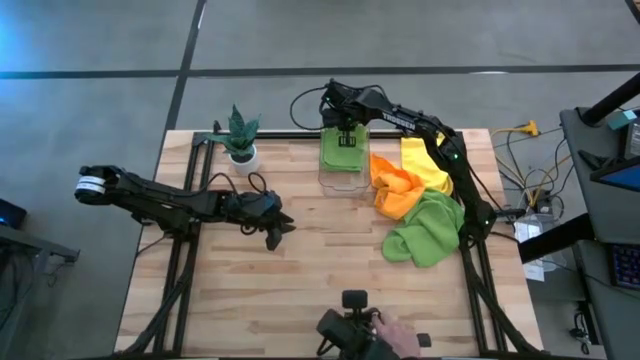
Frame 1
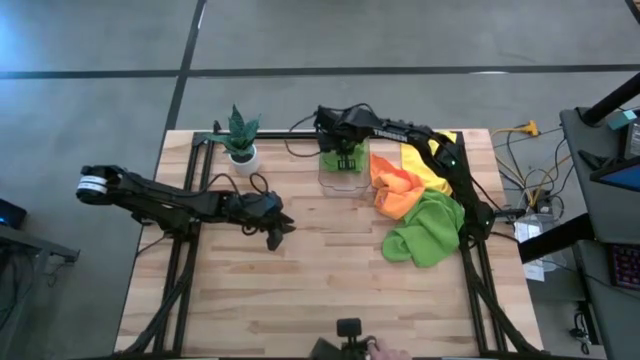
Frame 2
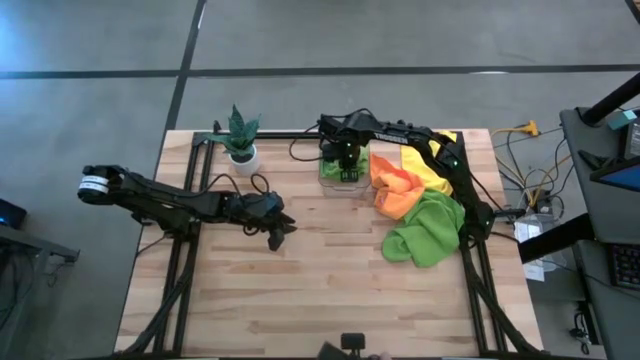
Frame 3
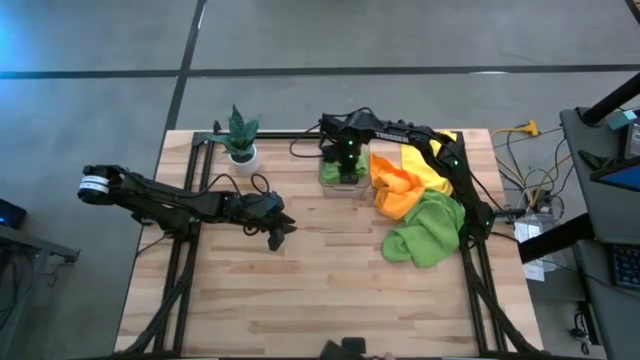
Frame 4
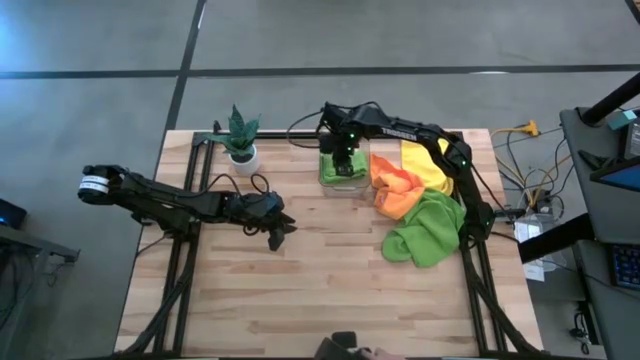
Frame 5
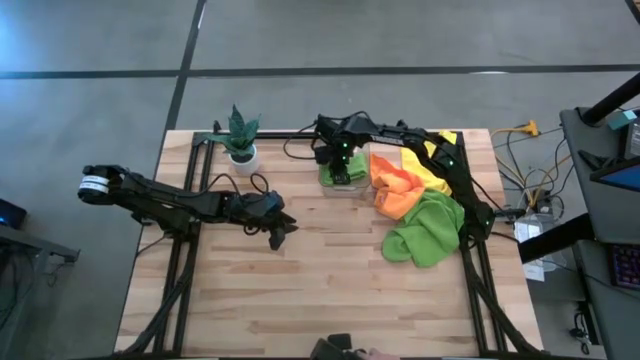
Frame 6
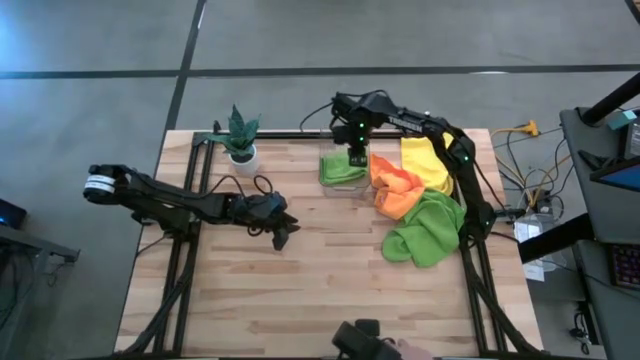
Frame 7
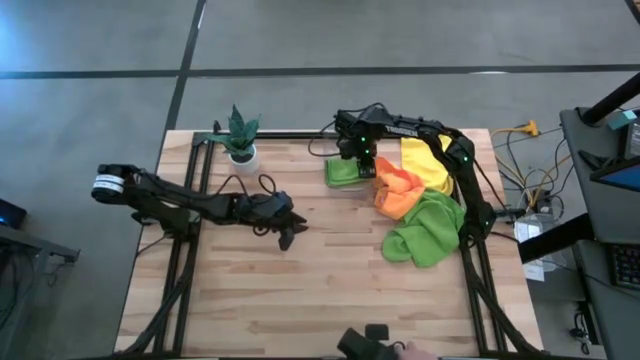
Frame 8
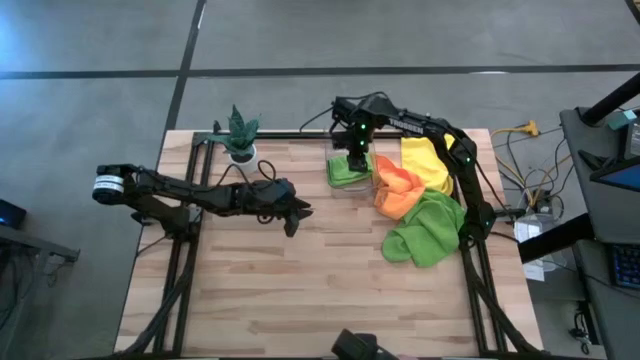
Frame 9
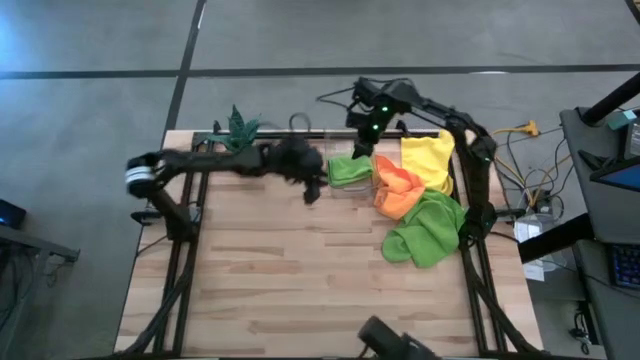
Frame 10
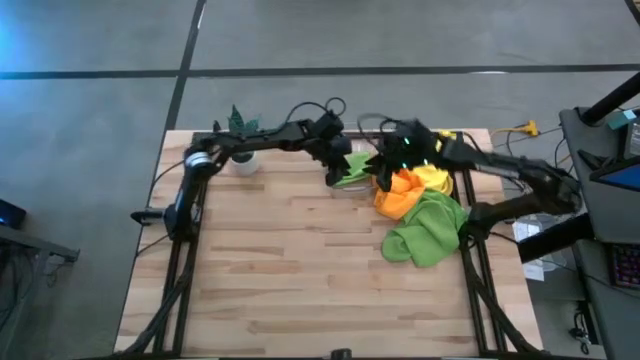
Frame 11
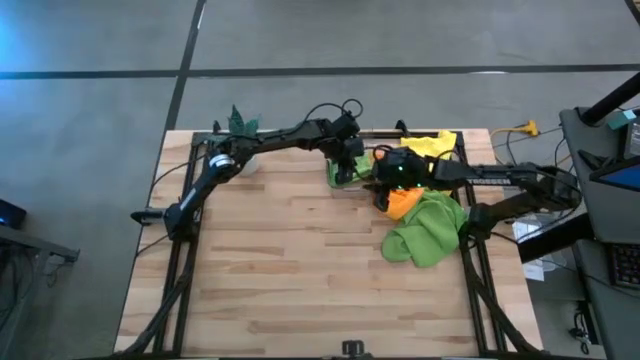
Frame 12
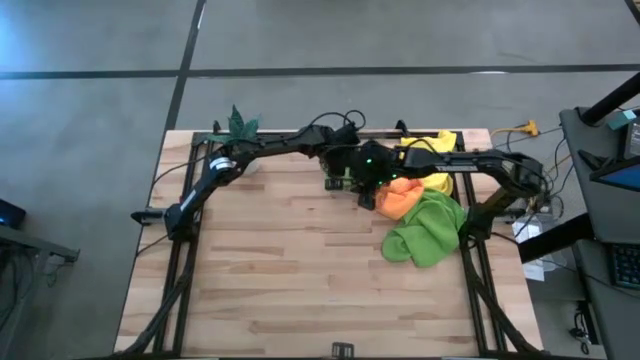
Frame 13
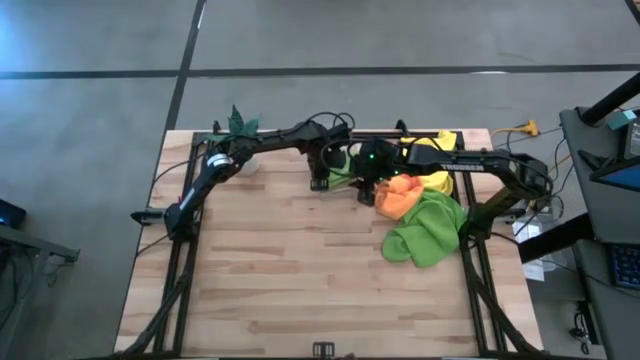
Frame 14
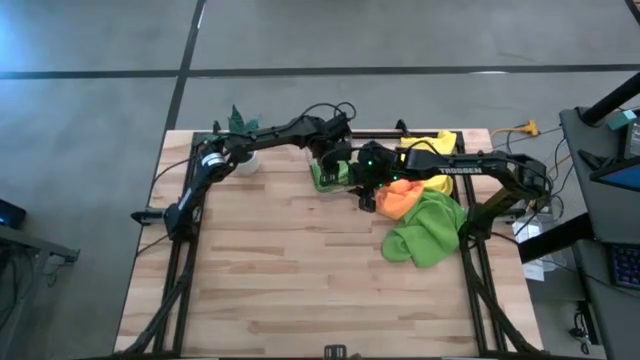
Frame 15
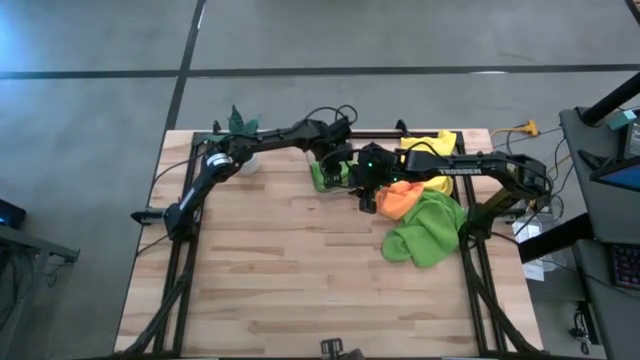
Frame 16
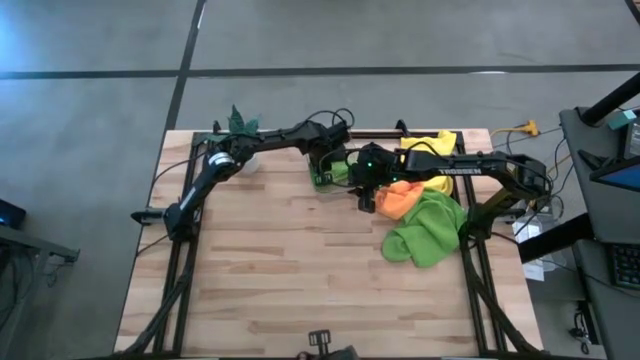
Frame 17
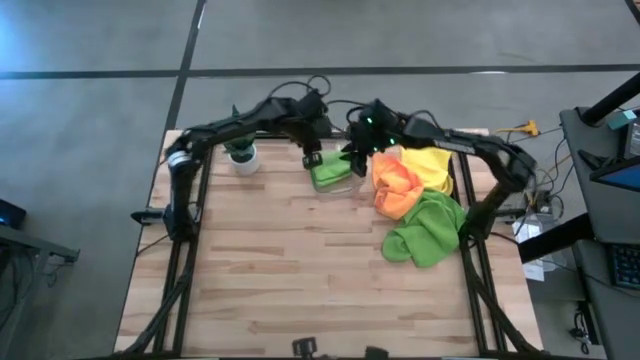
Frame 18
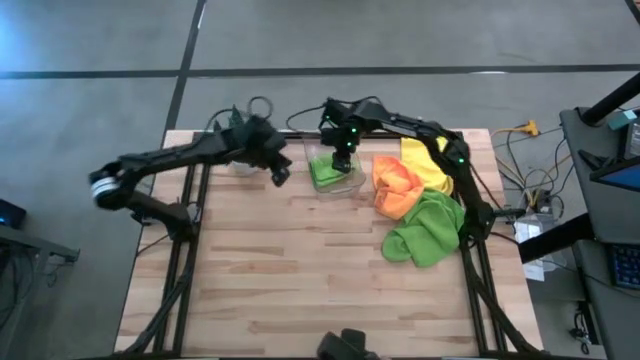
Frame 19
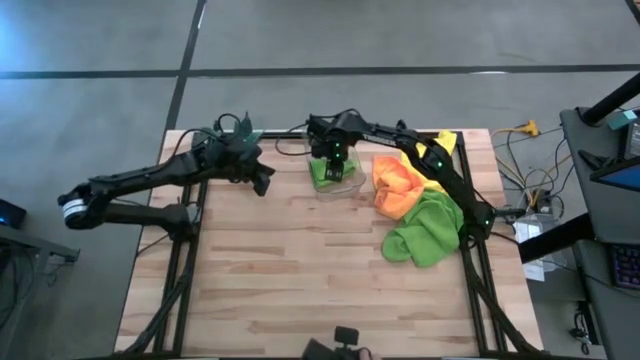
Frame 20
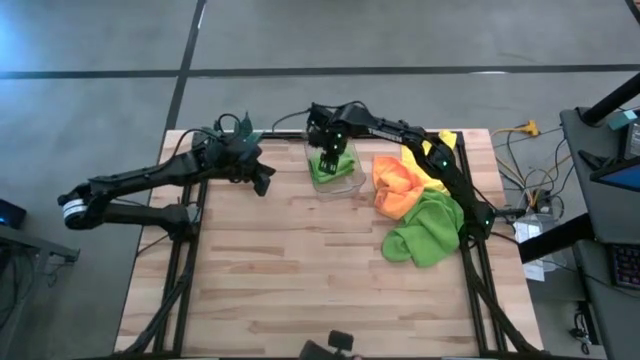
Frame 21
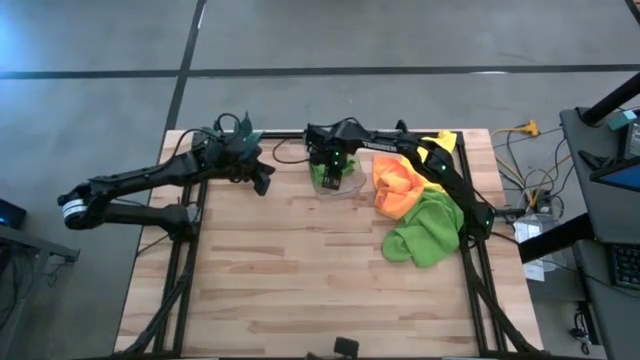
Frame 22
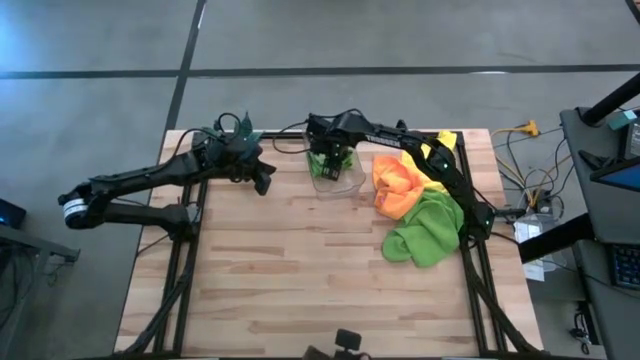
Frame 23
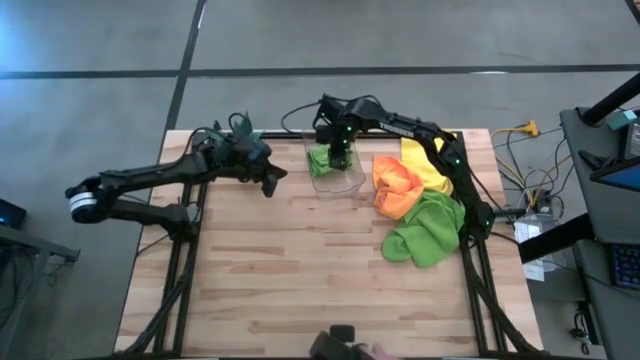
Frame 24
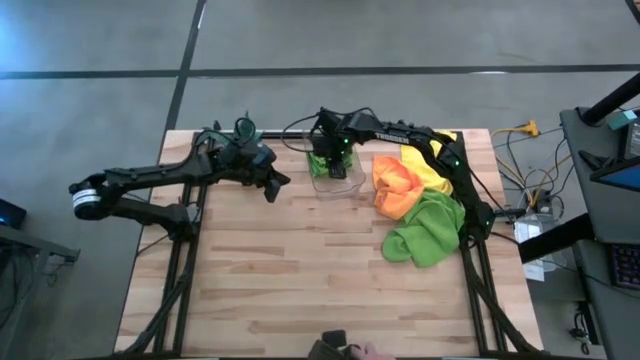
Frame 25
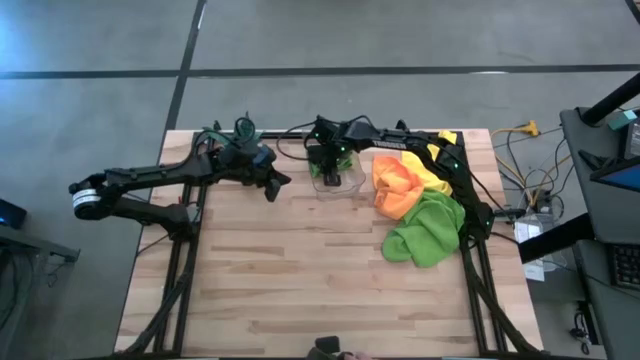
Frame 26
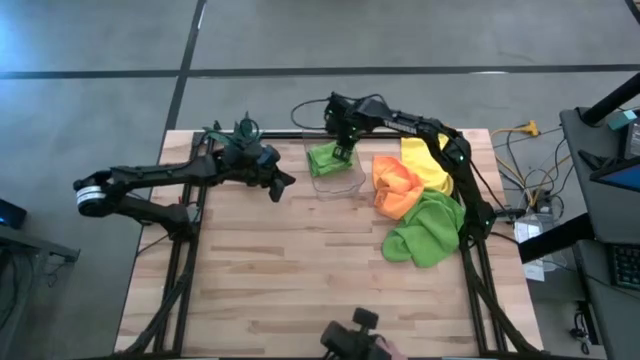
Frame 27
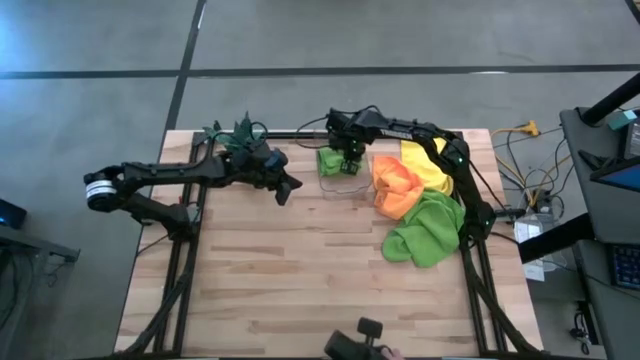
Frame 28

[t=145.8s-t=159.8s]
Task: Fold microfiber towels
Put the folded top green towel into the transparent bin

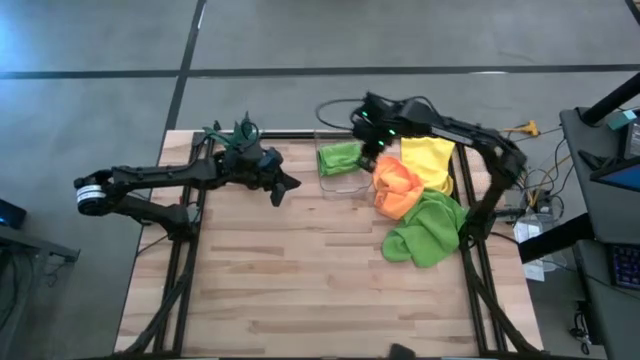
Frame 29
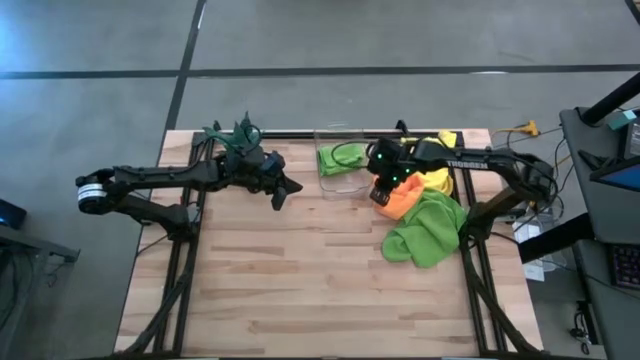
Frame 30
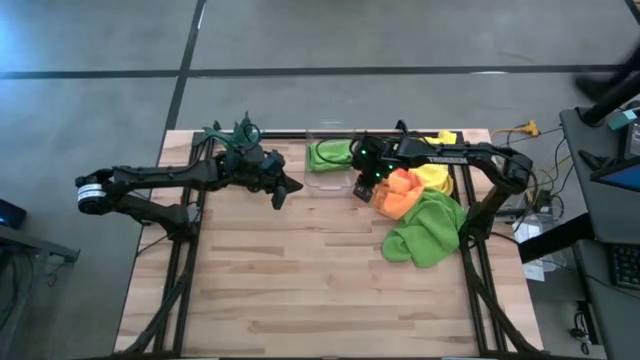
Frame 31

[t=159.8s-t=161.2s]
Adjust the transparent bin

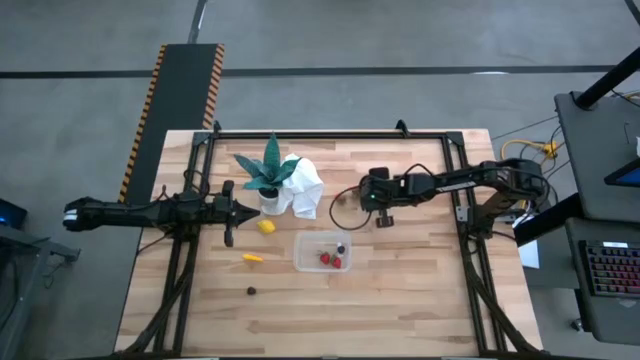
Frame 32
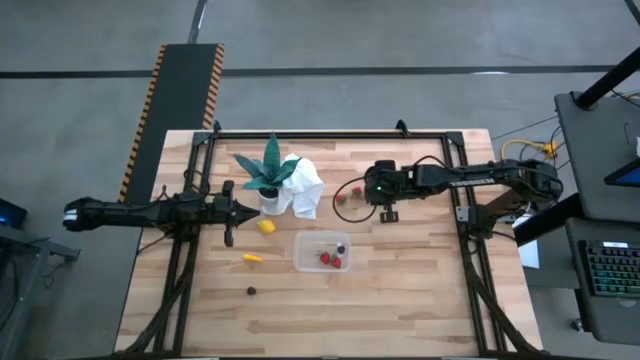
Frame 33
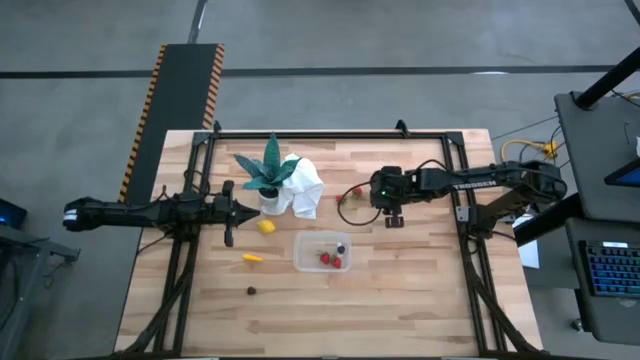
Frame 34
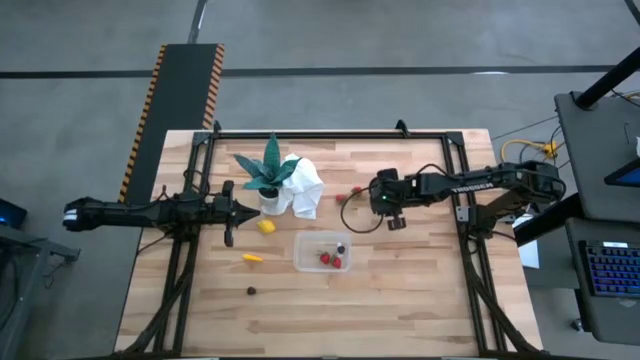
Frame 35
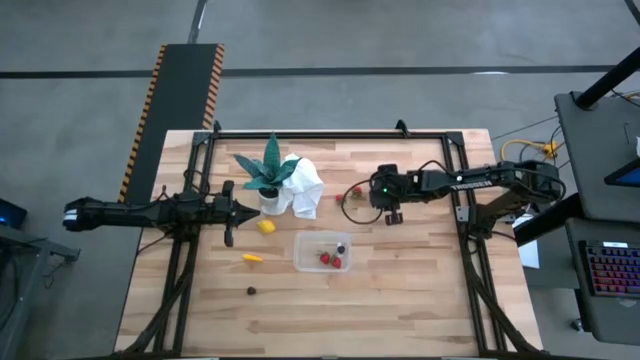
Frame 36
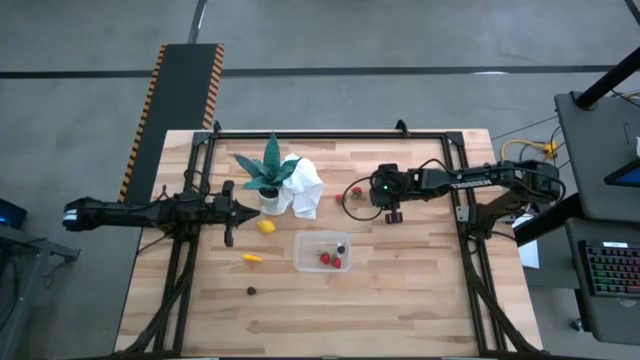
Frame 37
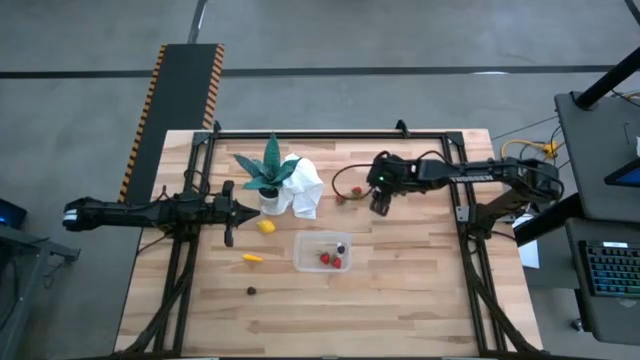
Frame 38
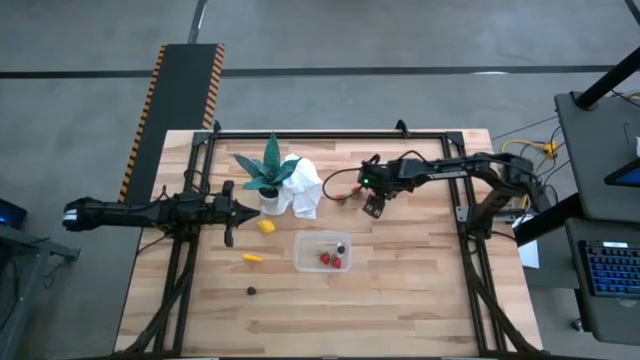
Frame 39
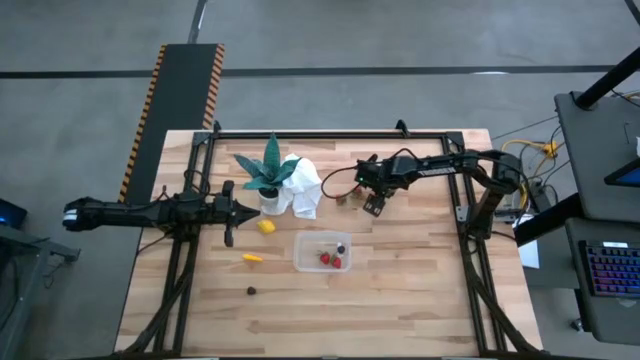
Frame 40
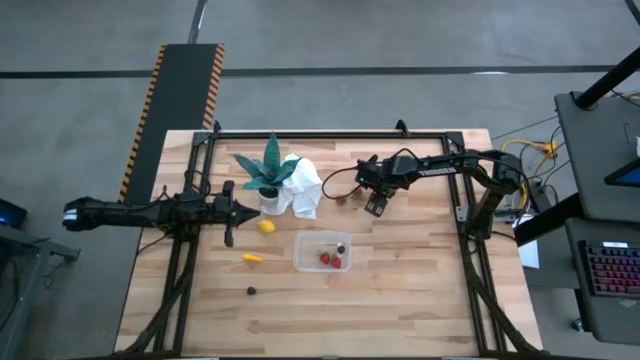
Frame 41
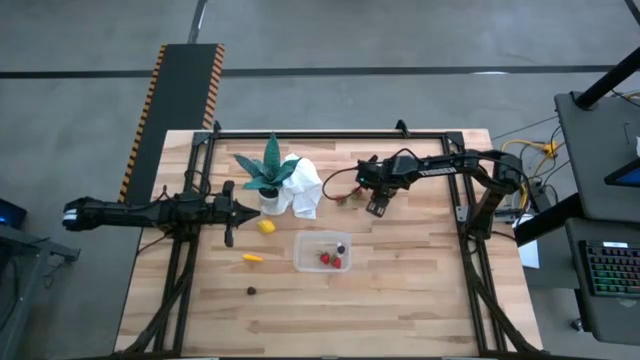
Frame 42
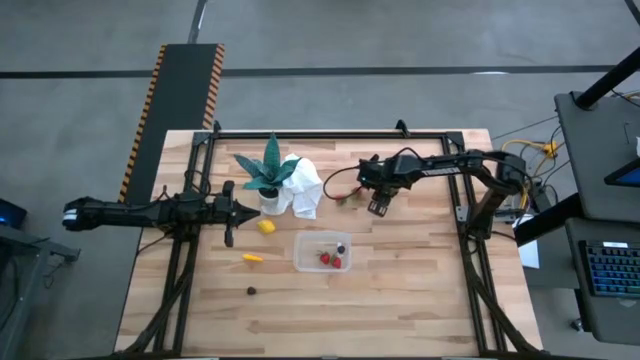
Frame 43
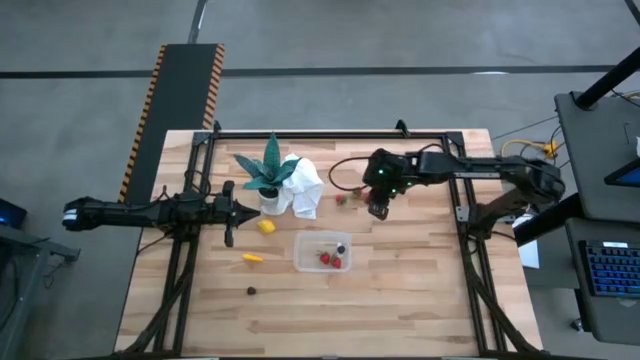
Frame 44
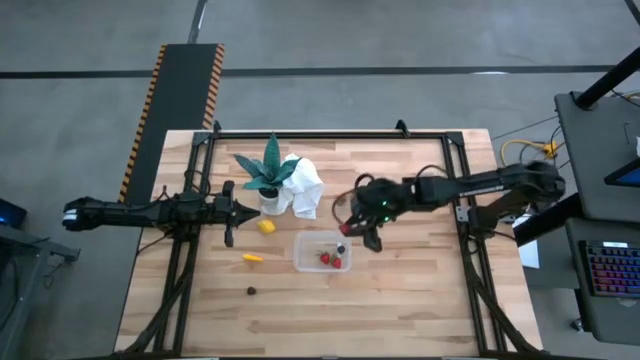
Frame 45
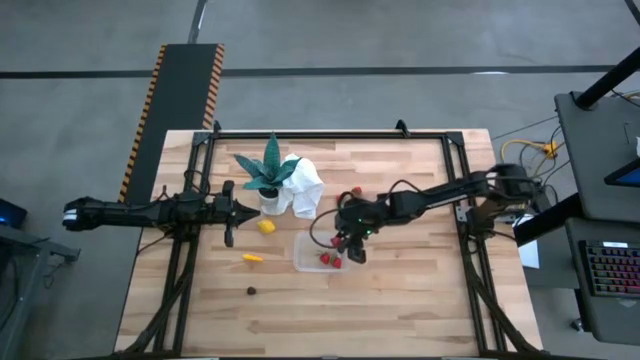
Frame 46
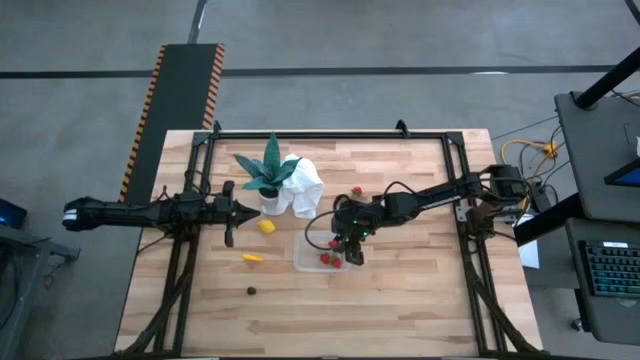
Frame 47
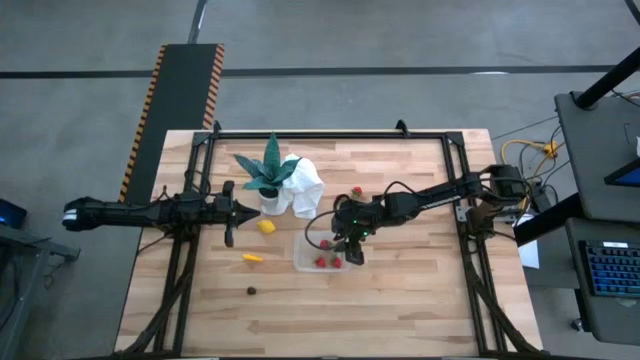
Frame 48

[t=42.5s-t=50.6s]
Task: Pick and placing Produce into tupperware
Put the strawberry into the bin
